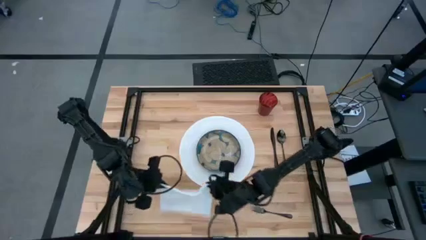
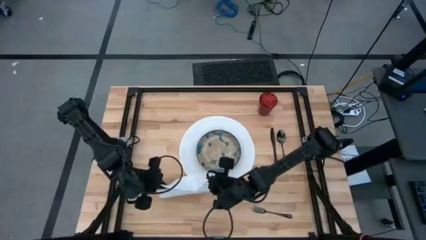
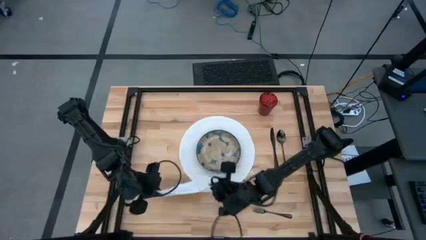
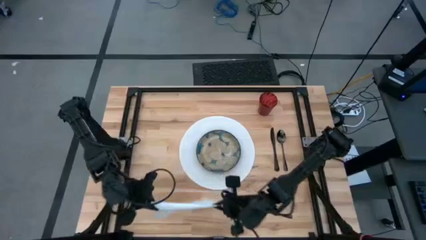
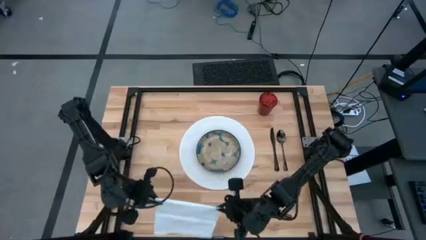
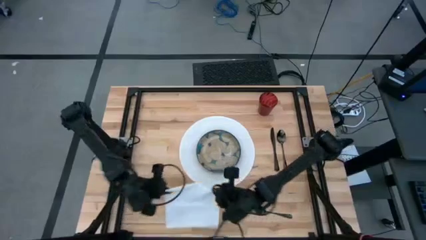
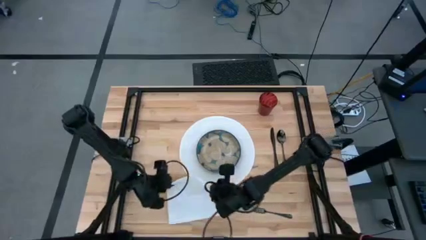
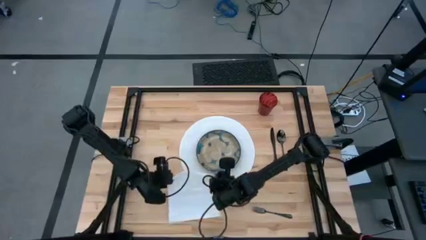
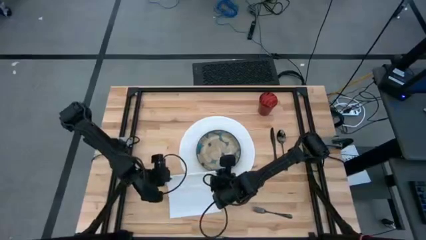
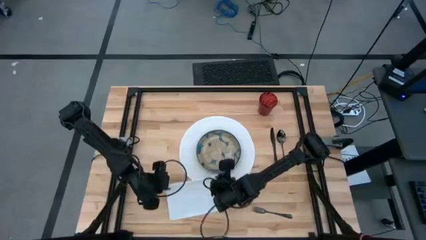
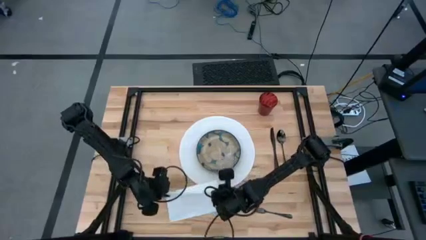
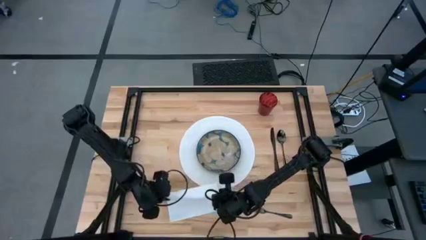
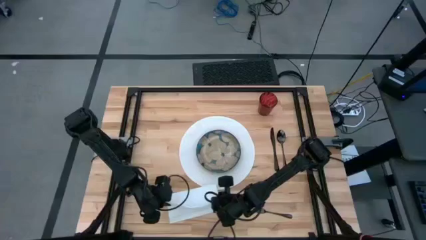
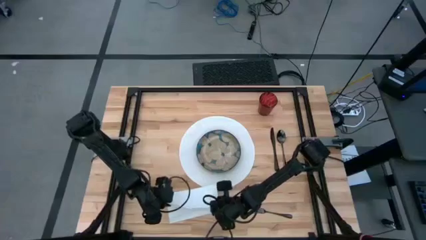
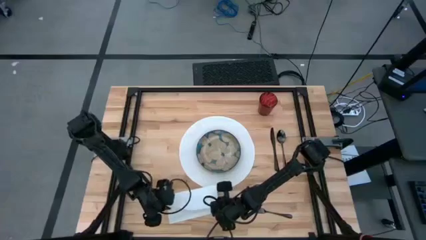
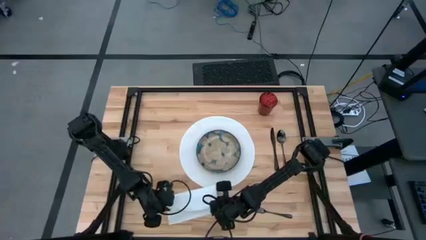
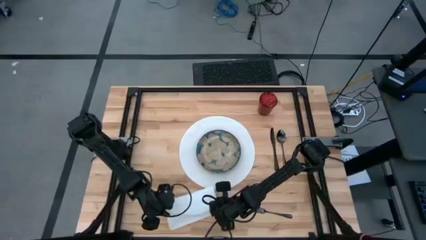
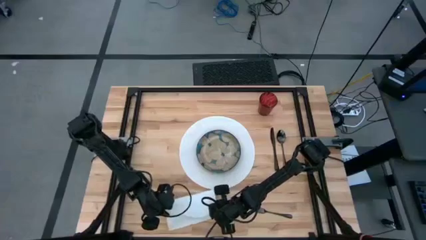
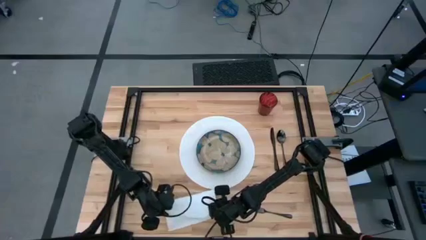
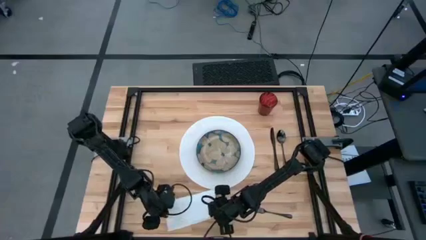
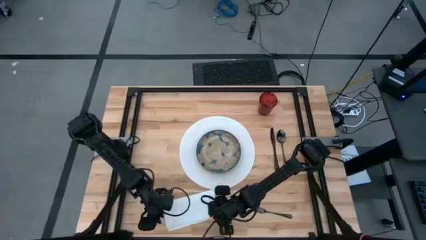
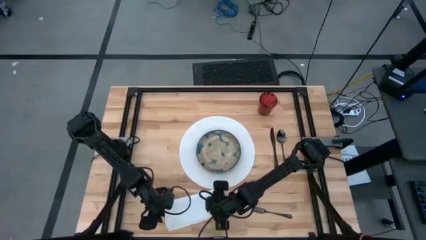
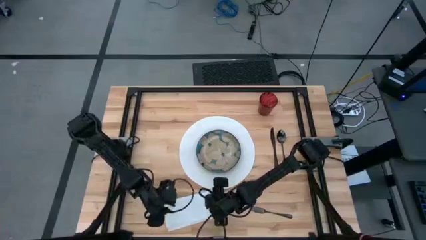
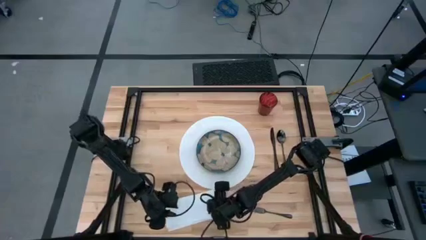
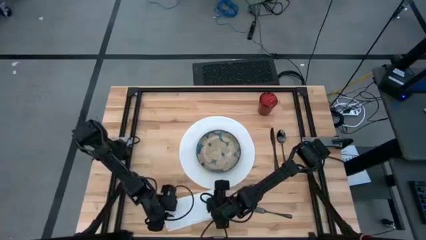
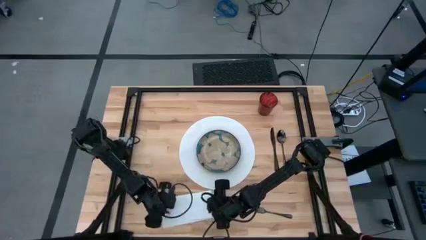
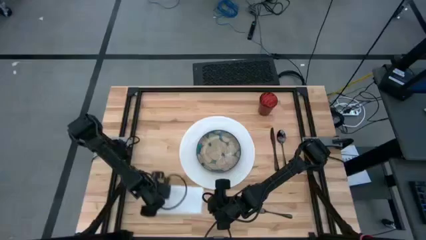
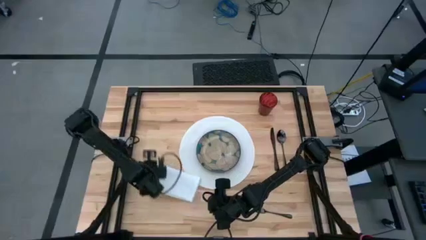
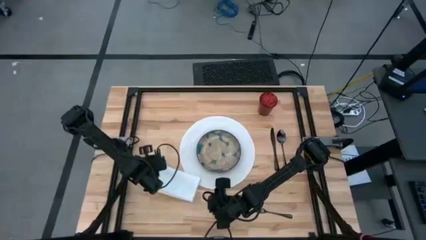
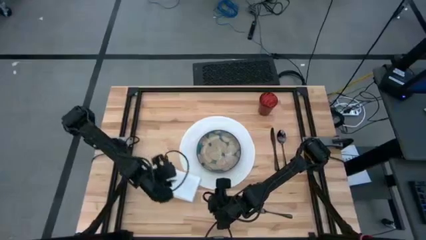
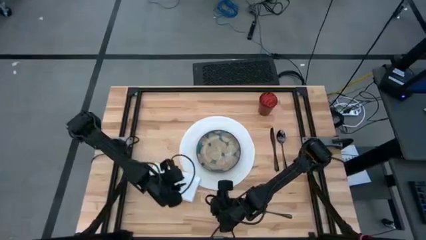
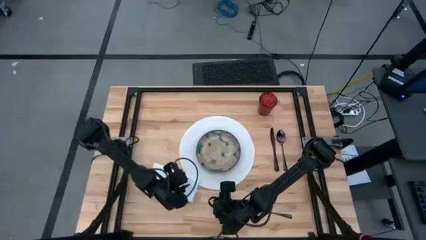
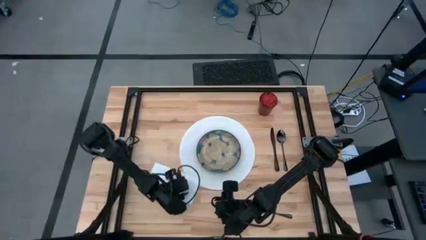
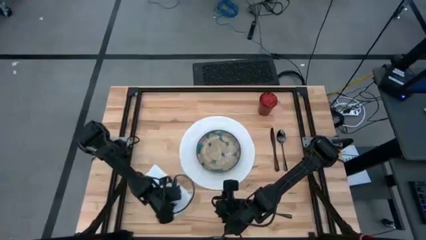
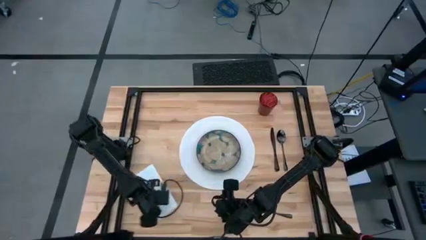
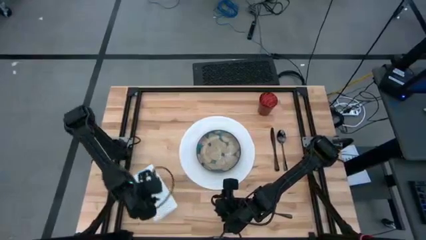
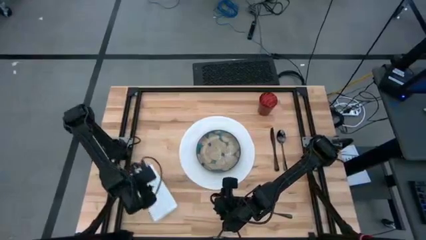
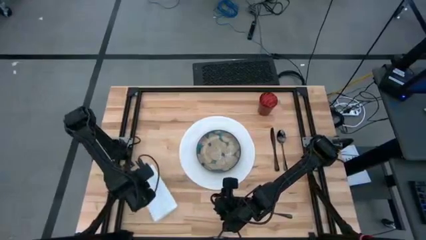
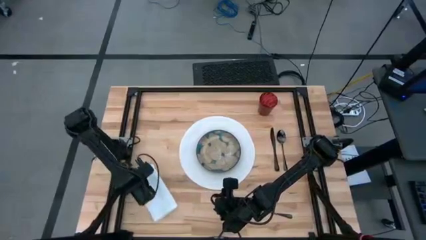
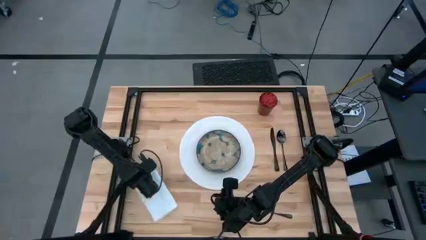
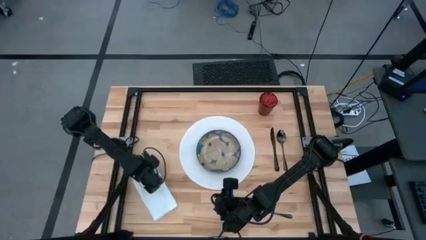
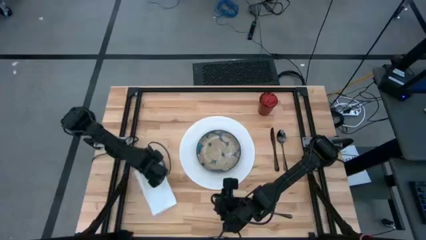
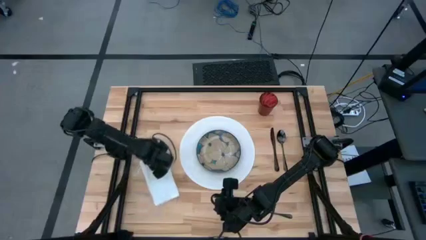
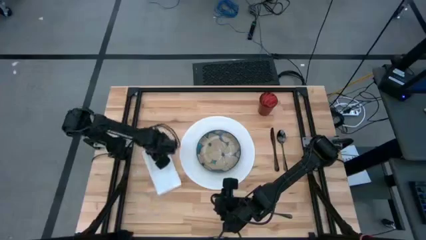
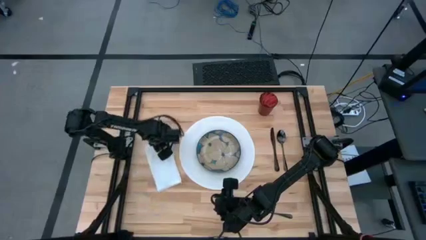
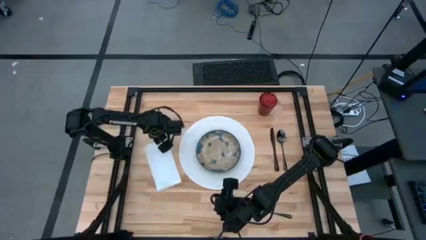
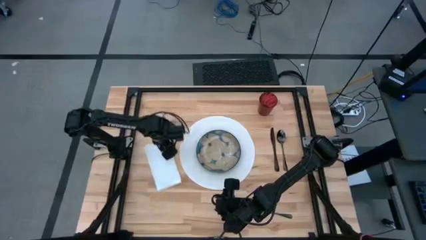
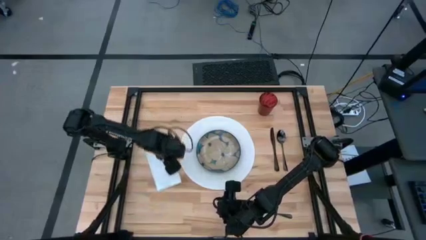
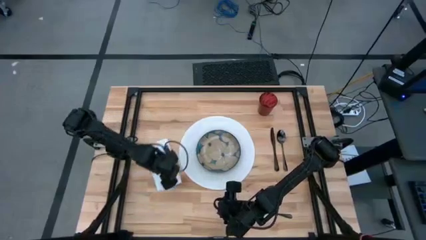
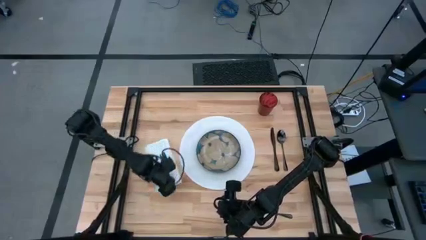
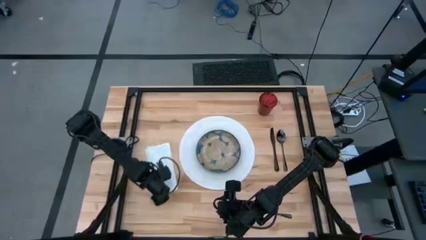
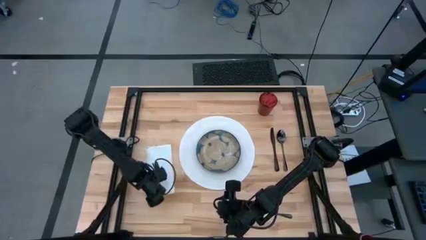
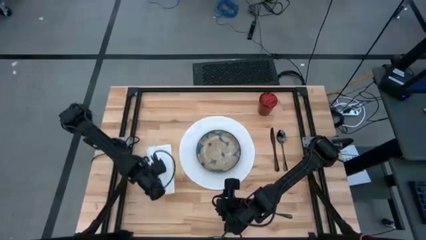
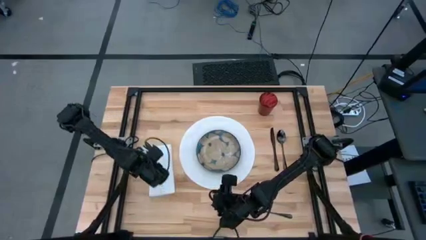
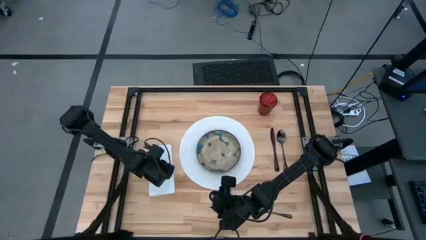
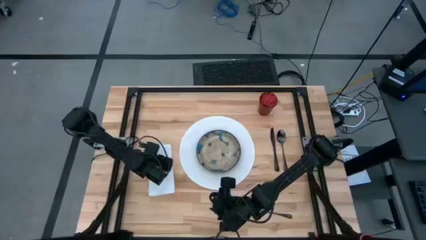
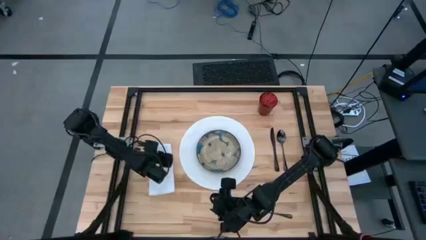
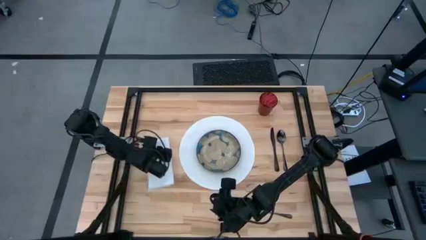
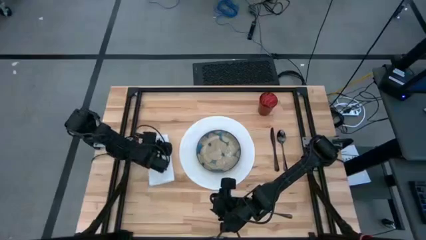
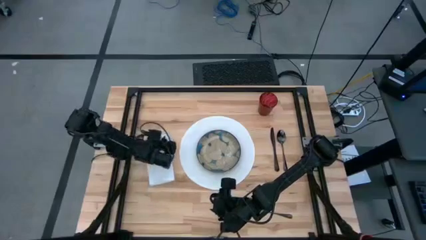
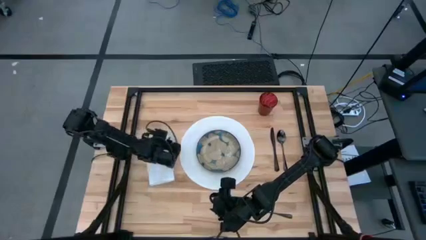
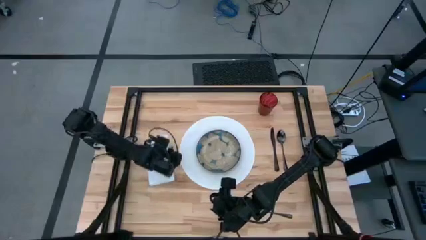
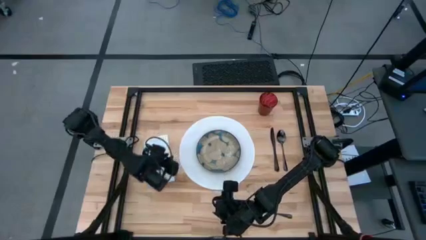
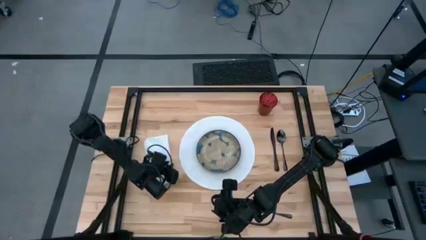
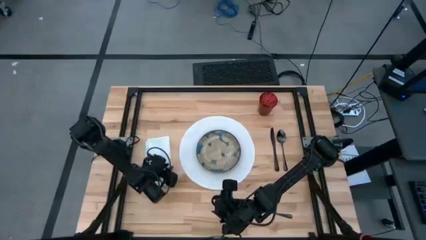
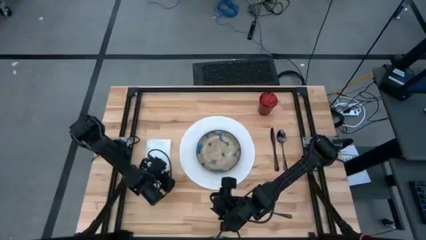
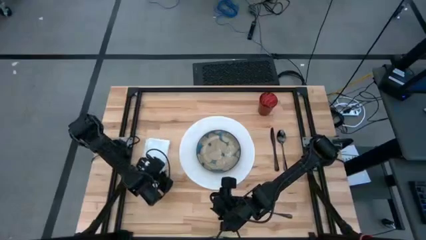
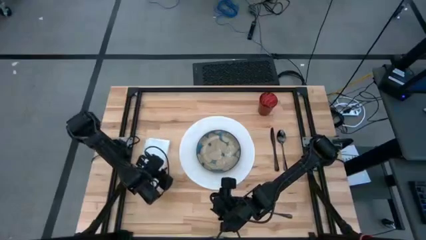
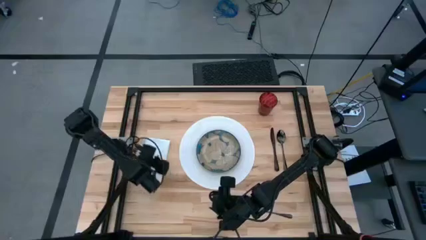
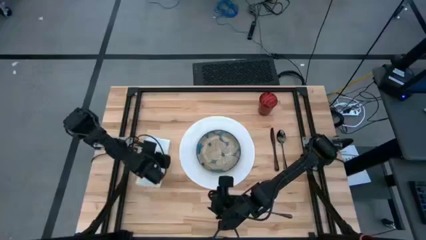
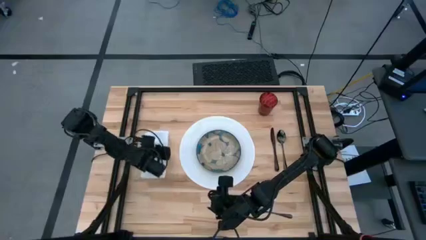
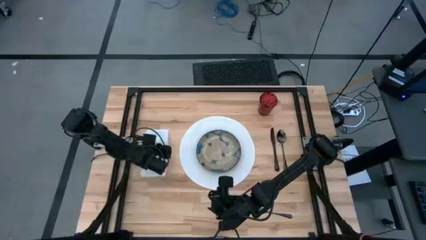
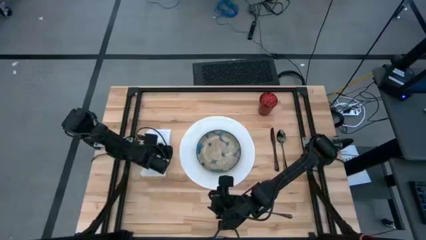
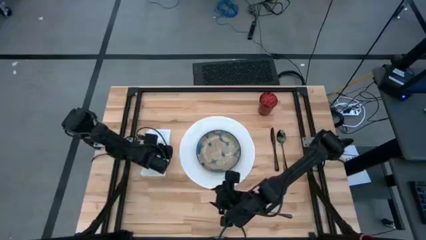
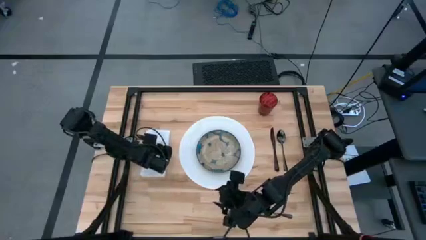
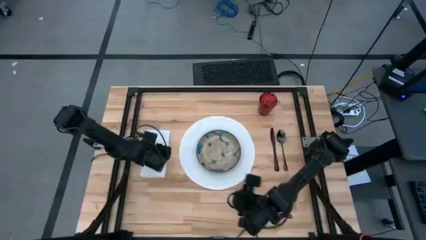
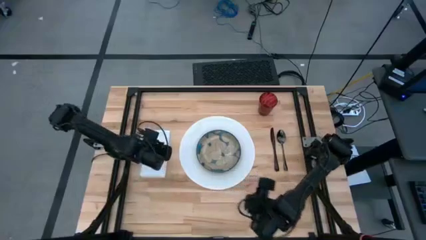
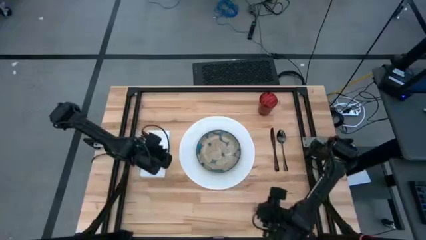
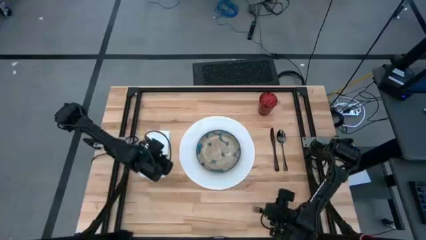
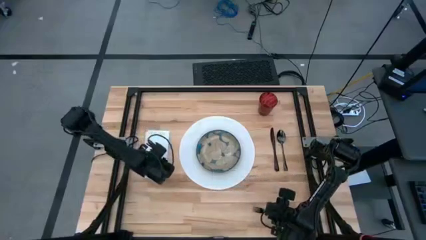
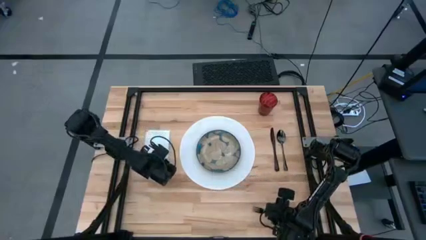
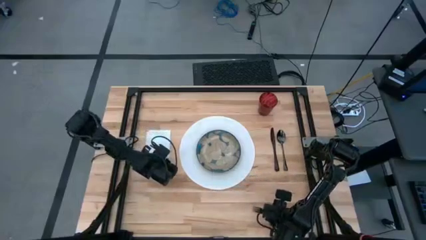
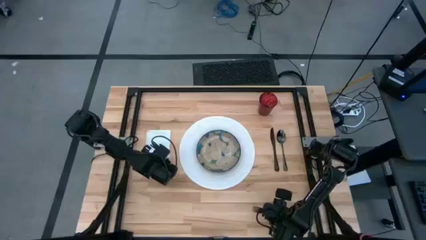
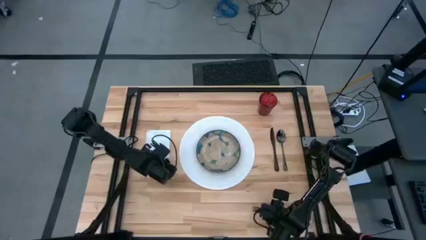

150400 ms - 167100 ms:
Task: Set table place
Fold the white table napkin
